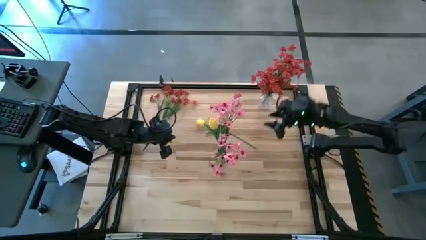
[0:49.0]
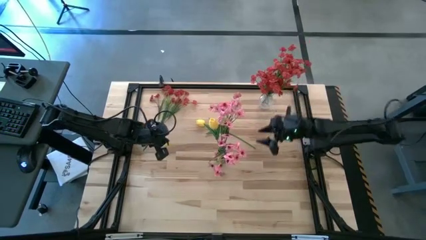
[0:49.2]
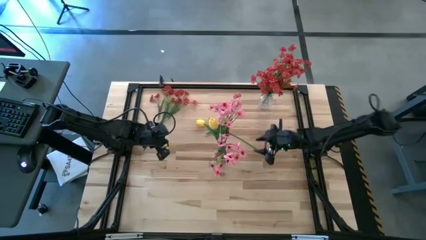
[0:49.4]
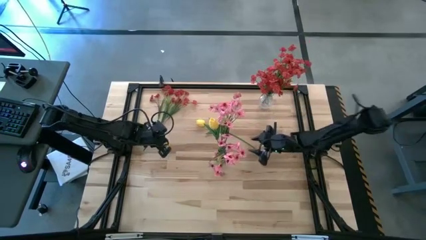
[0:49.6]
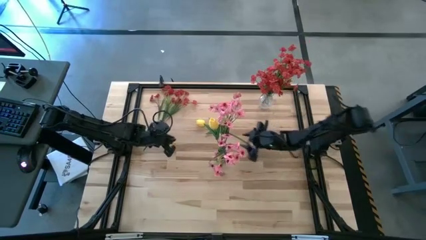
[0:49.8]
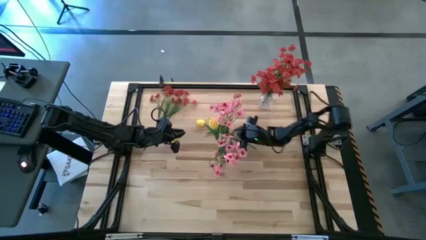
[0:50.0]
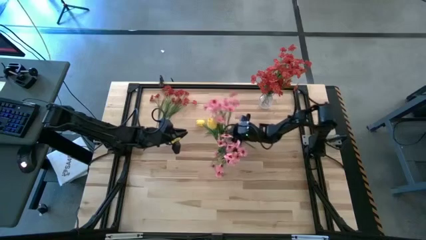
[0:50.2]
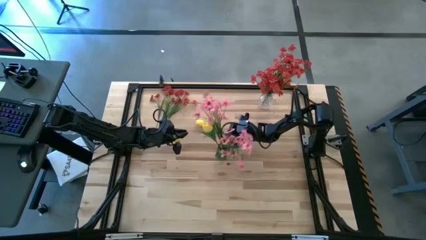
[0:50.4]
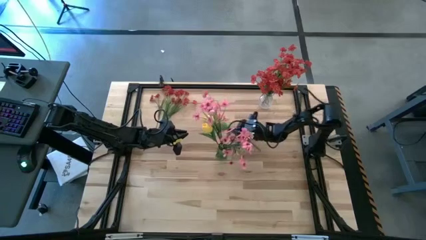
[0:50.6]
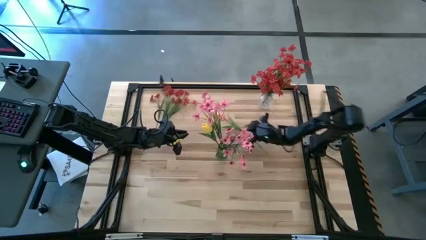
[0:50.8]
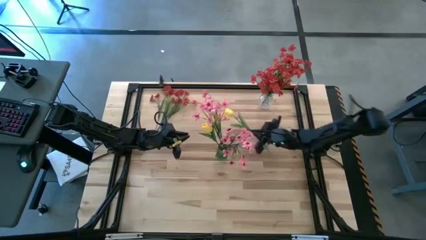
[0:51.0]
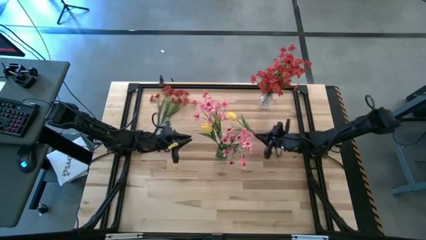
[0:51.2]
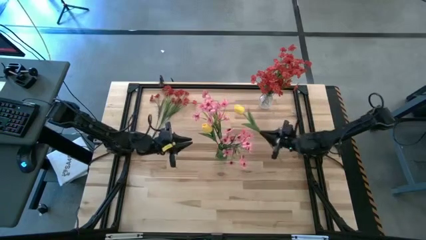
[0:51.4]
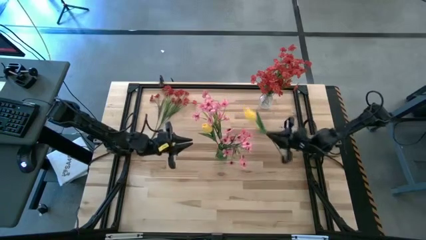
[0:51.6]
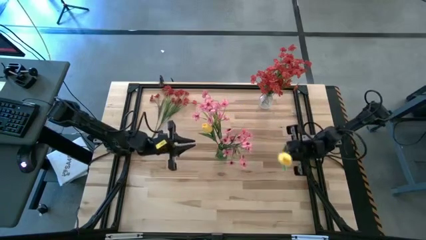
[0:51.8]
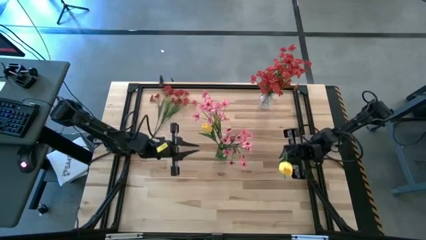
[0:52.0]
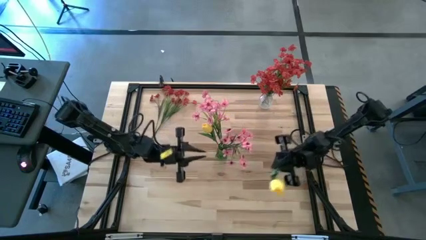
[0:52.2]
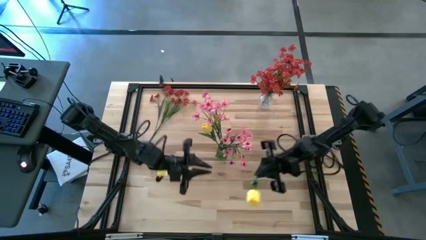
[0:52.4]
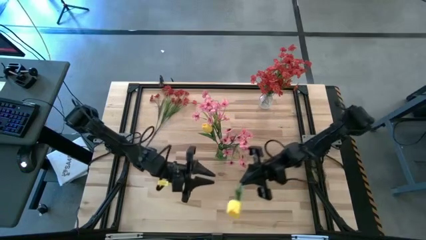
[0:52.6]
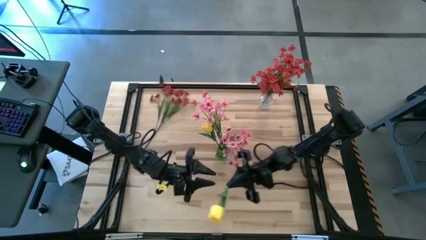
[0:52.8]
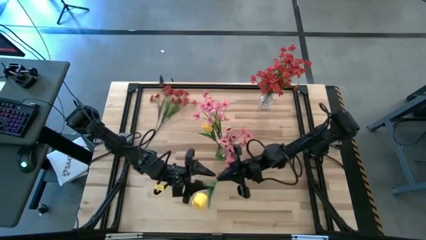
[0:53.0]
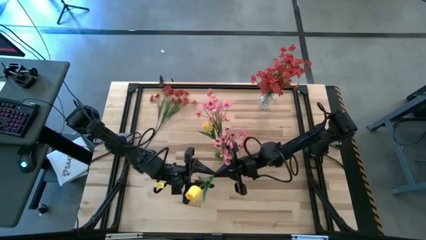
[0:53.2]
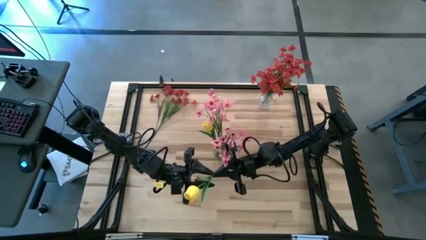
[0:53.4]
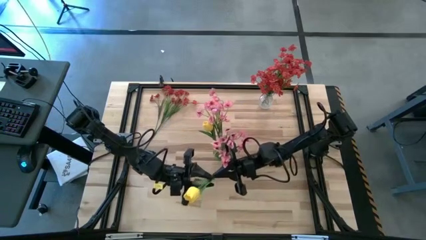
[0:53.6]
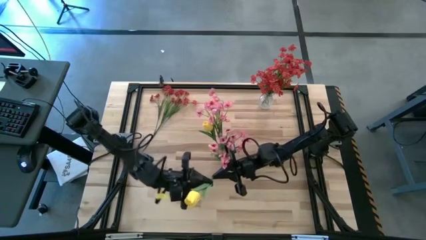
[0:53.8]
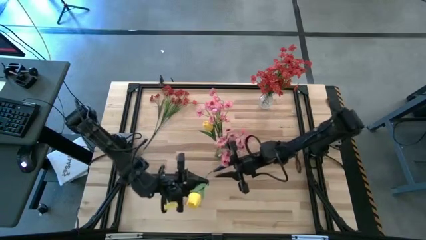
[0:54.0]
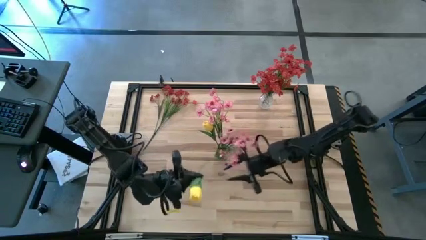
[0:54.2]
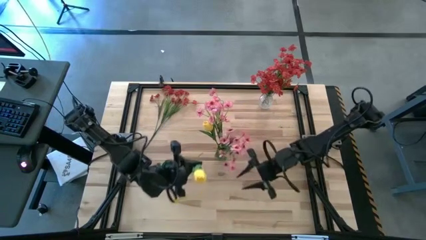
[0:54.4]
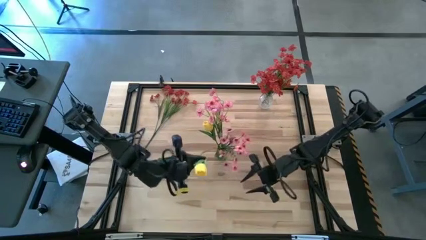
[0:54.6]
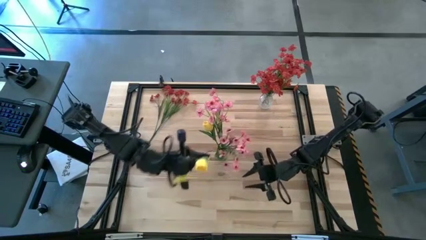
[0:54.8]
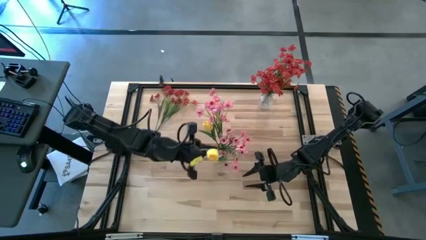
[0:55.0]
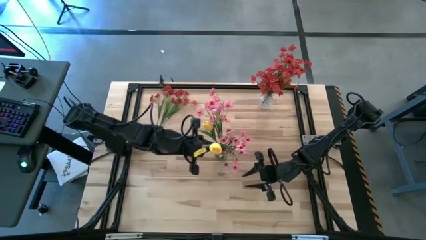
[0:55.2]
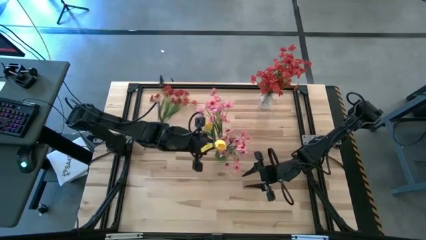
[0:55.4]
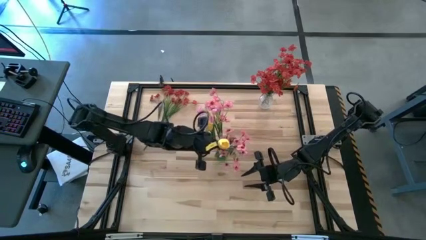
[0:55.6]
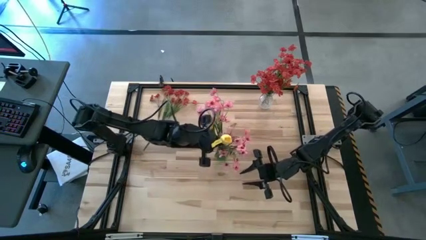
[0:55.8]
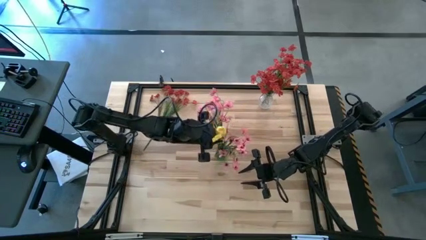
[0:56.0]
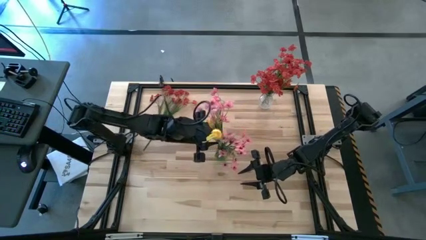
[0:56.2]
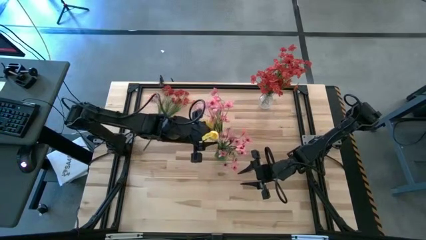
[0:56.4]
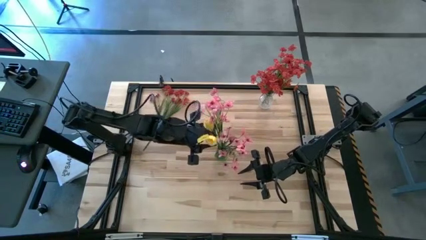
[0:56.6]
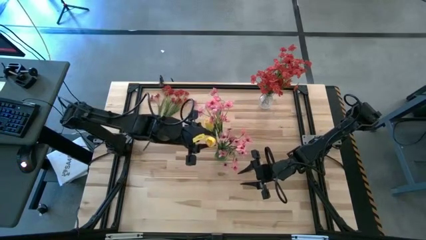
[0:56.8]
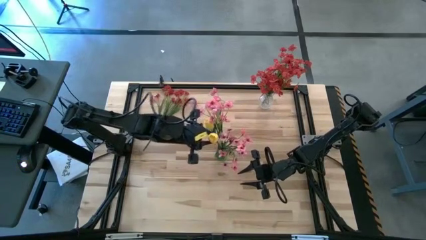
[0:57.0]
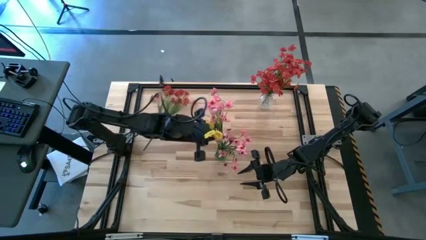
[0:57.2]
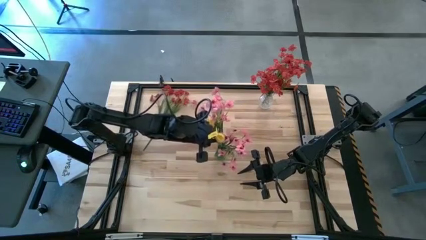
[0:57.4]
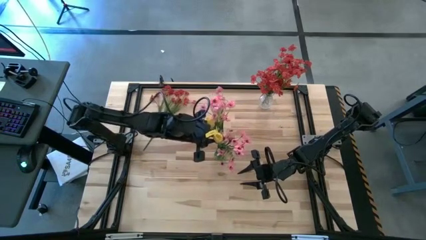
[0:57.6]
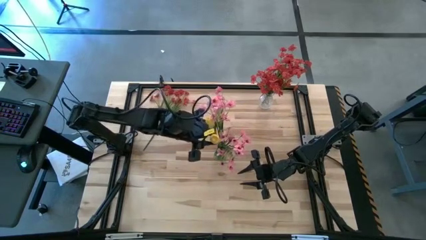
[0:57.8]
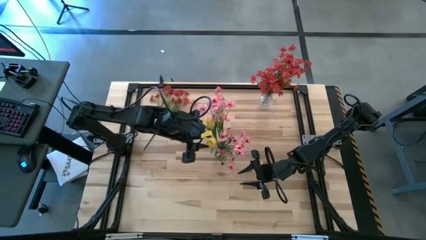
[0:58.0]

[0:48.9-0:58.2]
Task: Sort flowers into vase by color
Put the yellow tulip into the green vase

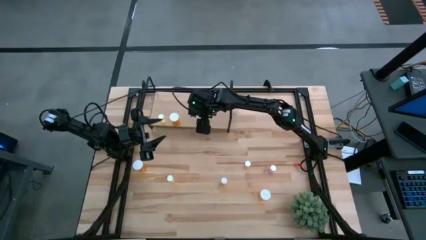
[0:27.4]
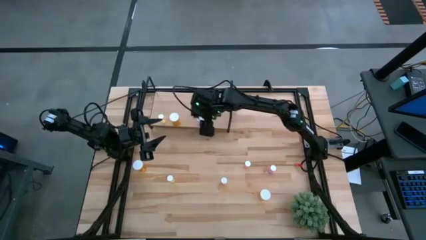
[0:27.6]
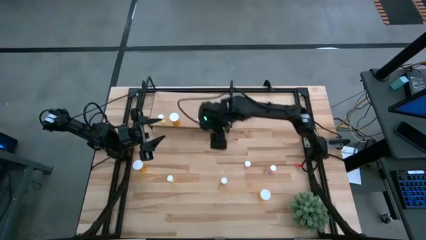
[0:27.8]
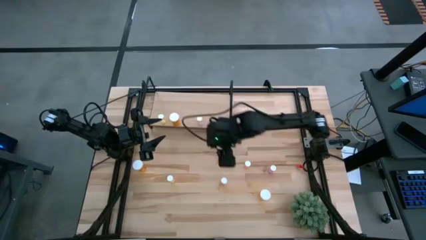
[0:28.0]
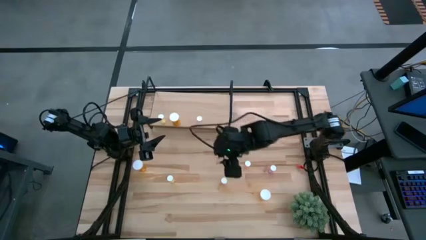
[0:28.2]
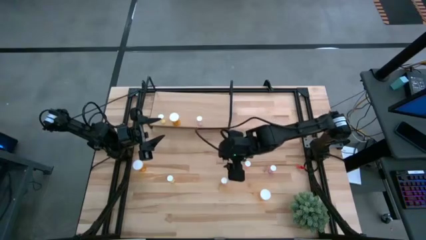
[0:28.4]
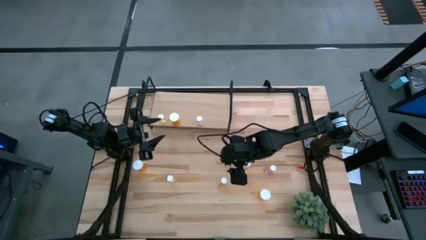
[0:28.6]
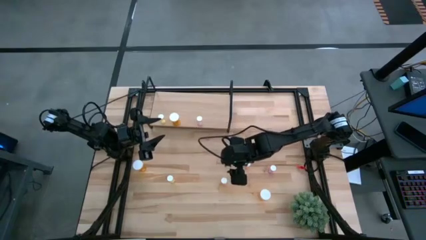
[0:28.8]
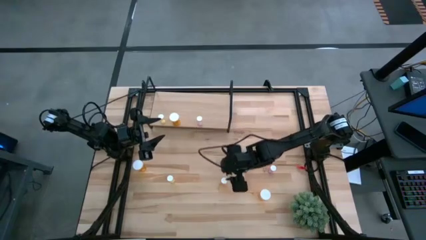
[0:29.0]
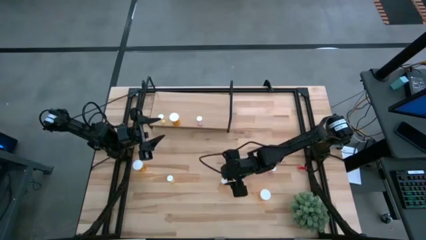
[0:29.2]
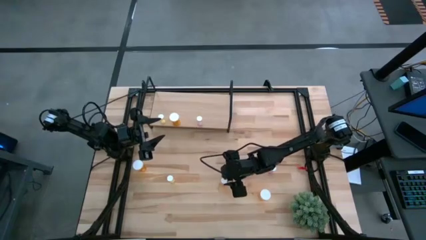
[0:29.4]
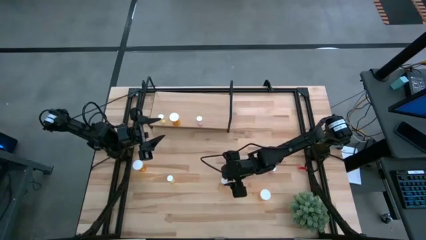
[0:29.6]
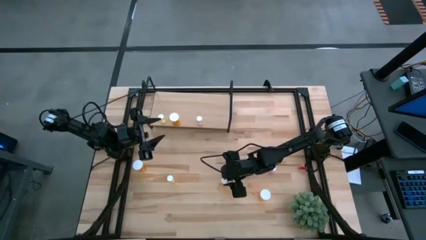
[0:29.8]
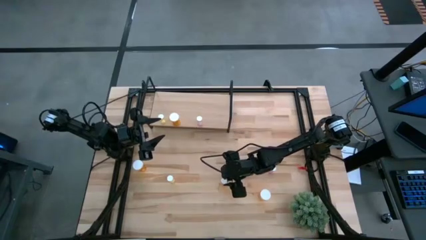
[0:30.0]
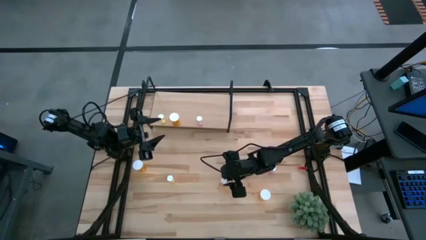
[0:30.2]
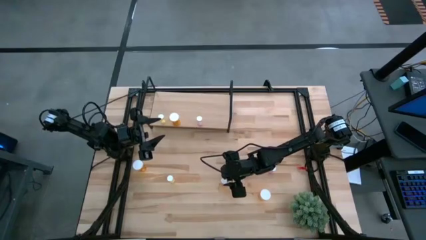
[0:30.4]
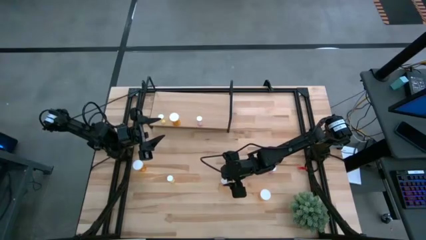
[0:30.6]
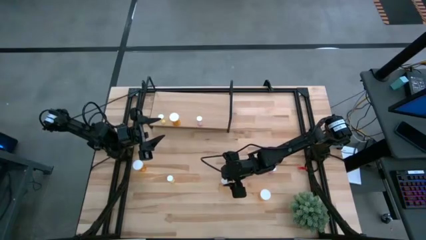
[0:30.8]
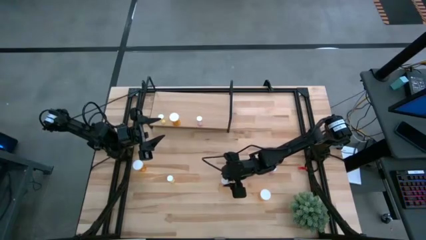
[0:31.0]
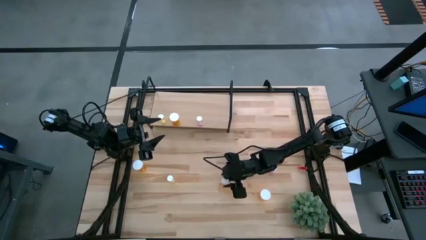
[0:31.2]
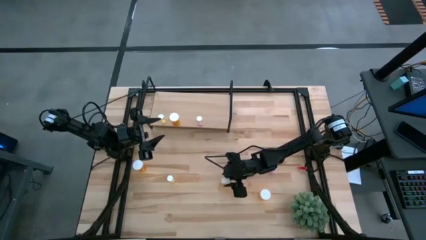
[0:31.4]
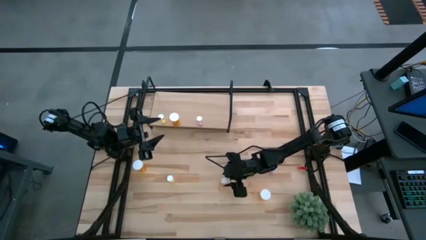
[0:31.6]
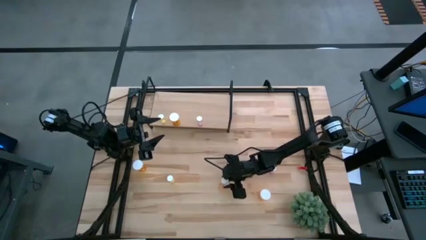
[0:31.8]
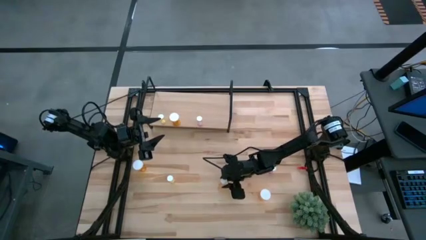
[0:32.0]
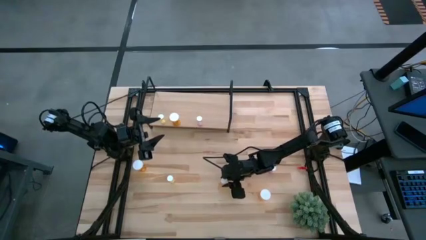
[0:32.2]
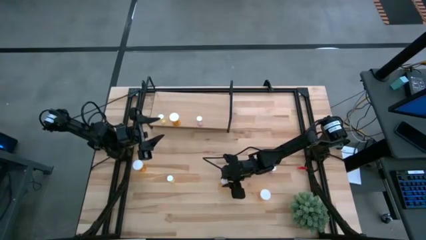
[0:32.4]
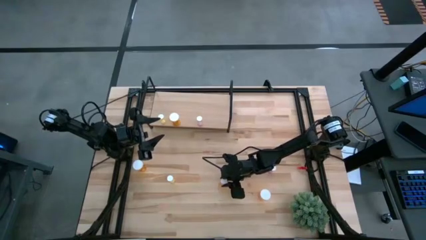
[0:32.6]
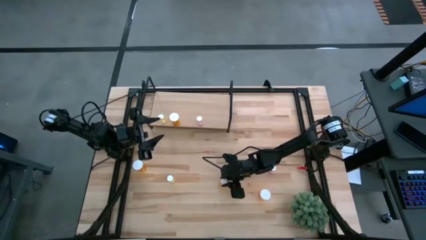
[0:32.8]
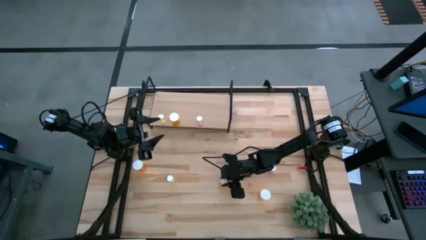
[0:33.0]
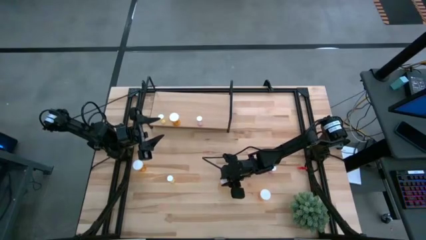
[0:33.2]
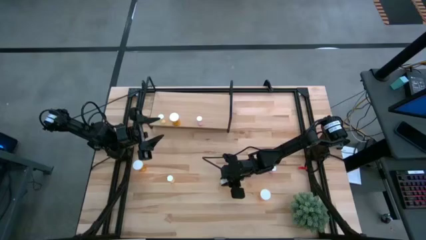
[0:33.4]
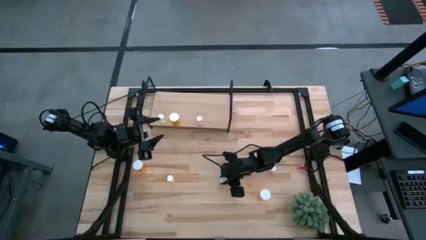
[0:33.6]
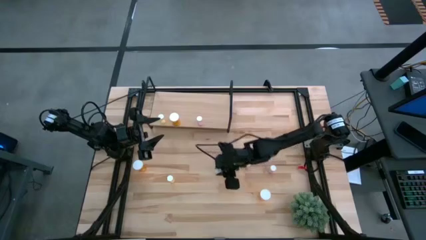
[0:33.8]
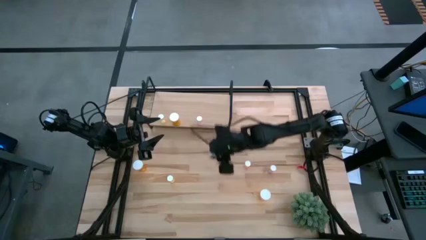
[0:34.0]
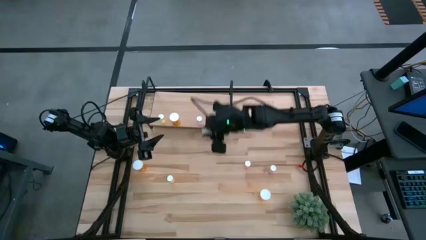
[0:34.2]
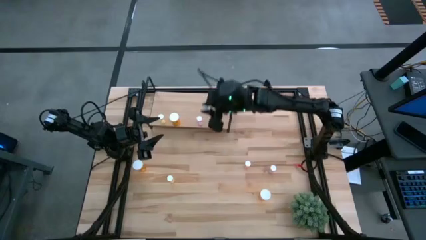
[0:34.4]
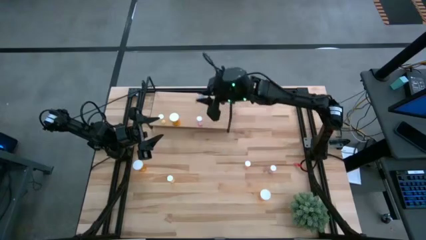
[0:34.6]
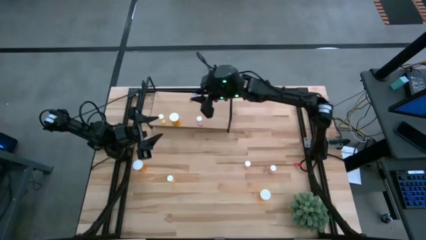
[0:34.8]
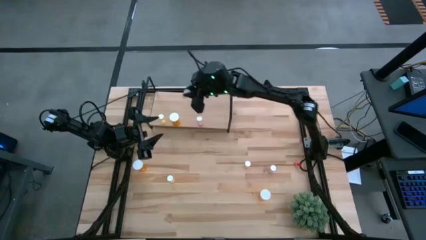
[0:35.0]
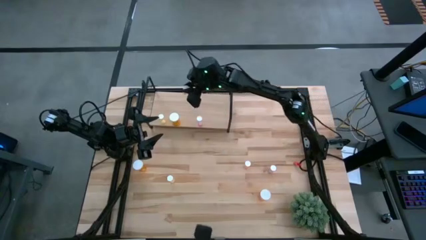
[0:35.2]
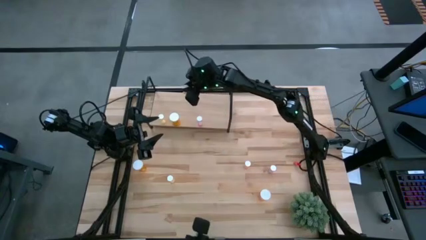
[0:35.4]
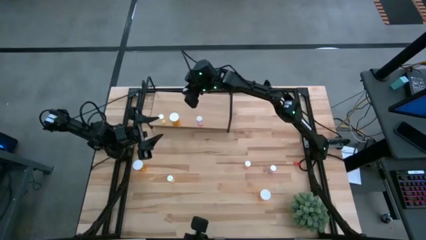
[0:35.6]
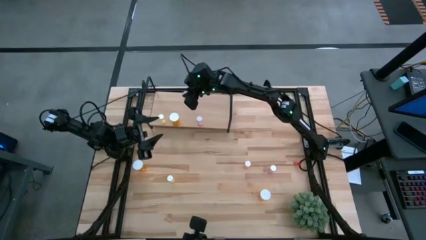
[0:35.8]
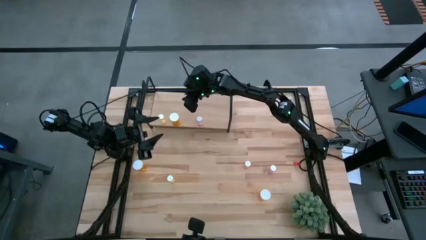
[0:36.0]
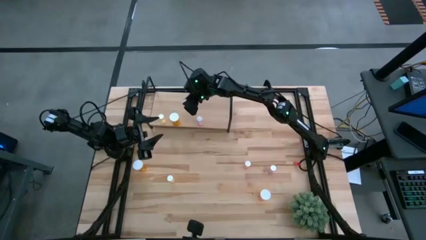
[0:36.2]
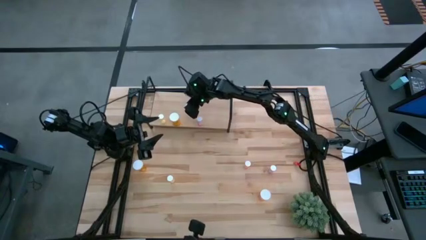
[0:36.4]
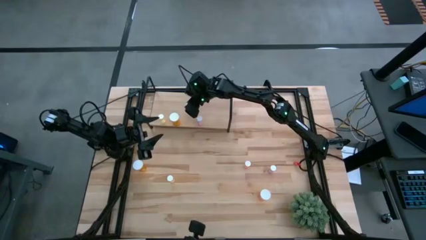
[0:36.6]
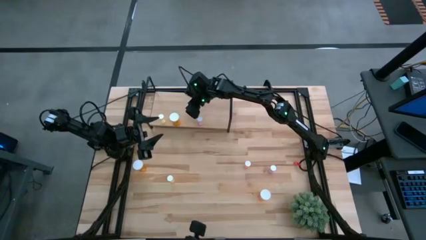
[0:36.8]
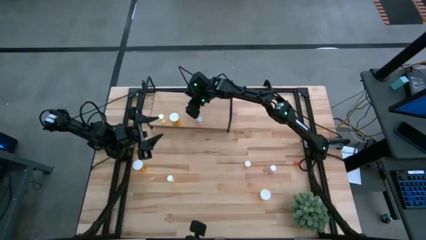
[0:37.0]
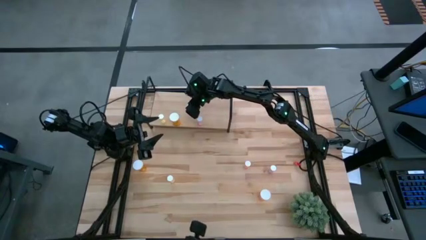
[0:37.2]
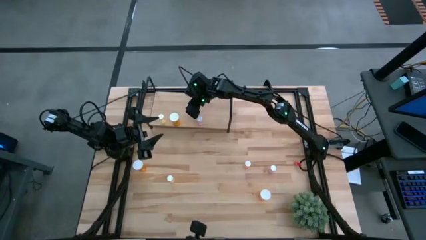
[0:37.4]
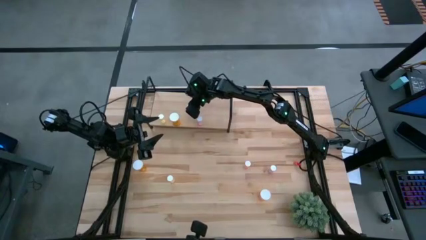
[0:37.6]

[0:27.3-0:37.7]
Task: Pick and place medicine bottles onto shelf by color
Put the right yellow pill bottle on the shelf
